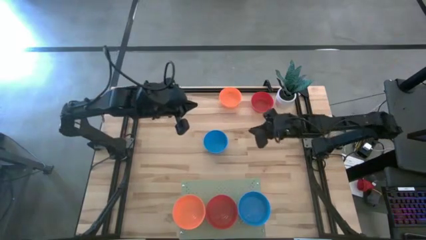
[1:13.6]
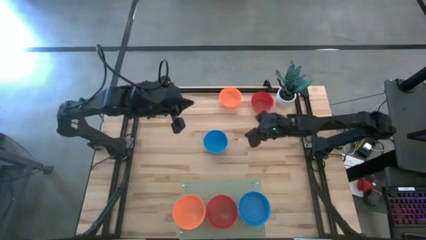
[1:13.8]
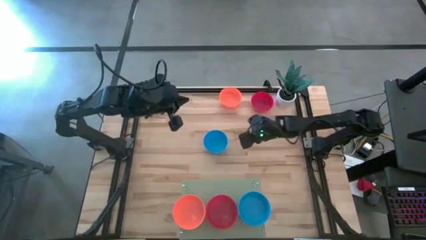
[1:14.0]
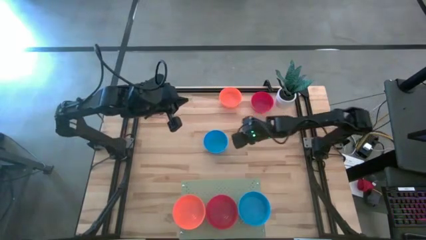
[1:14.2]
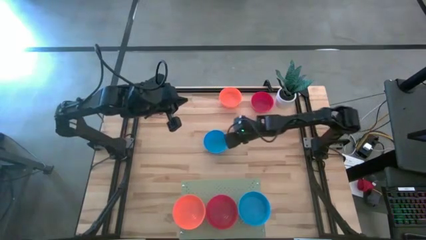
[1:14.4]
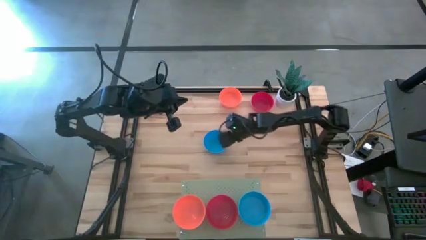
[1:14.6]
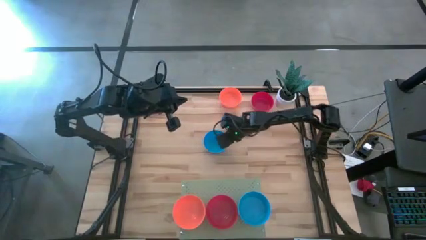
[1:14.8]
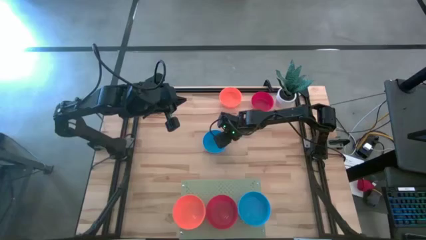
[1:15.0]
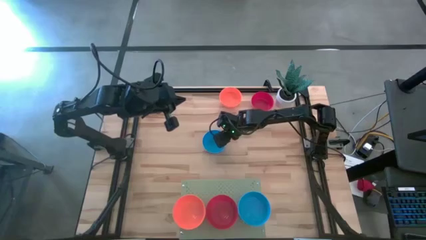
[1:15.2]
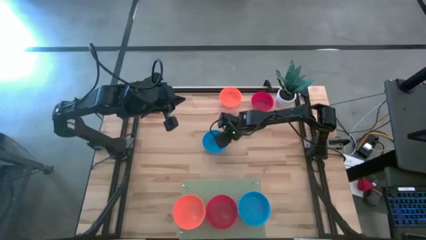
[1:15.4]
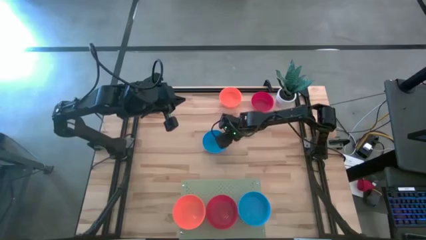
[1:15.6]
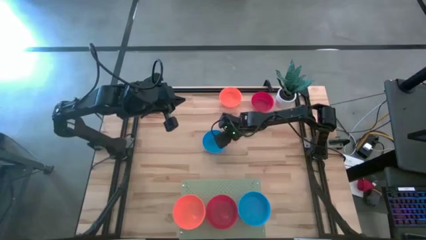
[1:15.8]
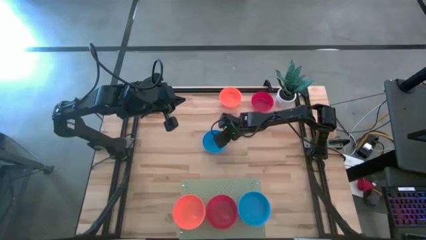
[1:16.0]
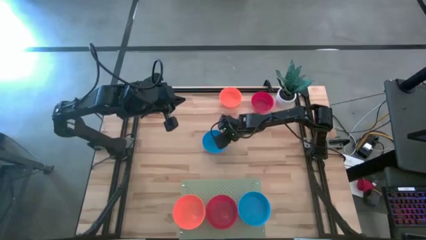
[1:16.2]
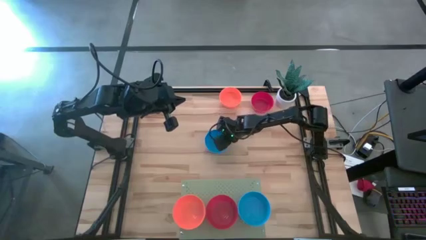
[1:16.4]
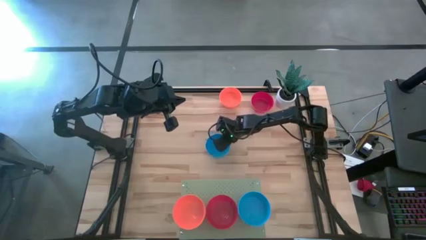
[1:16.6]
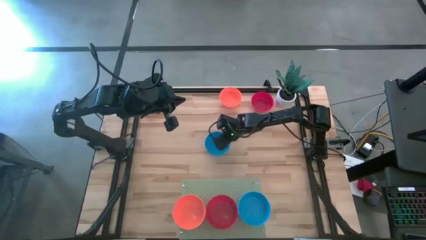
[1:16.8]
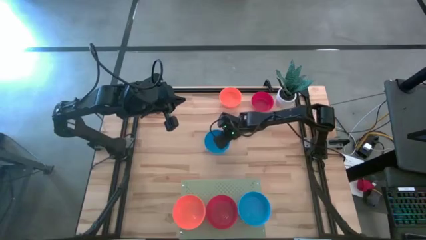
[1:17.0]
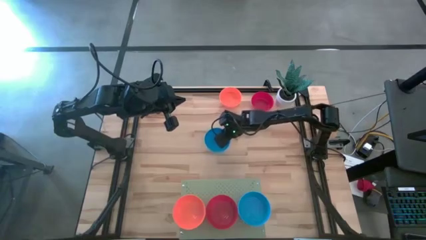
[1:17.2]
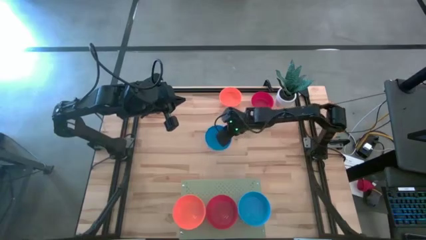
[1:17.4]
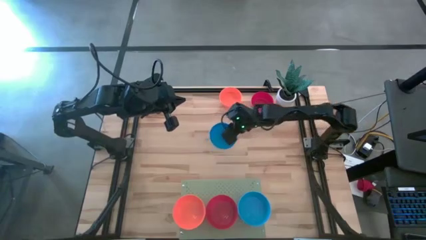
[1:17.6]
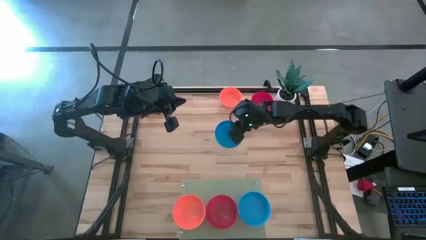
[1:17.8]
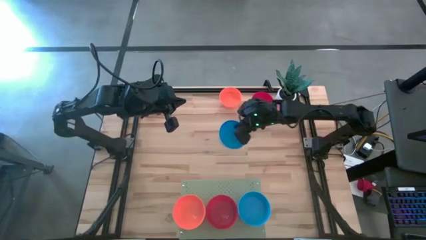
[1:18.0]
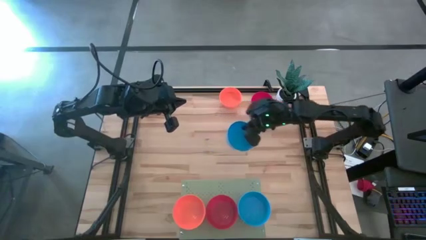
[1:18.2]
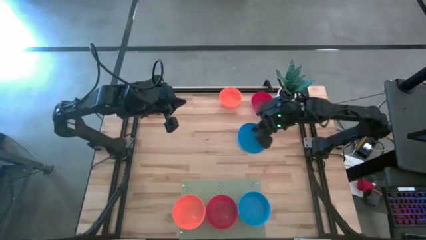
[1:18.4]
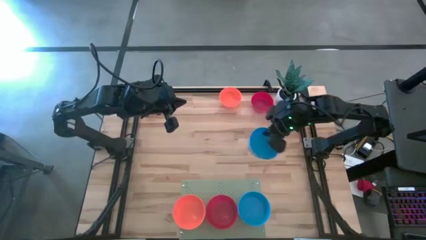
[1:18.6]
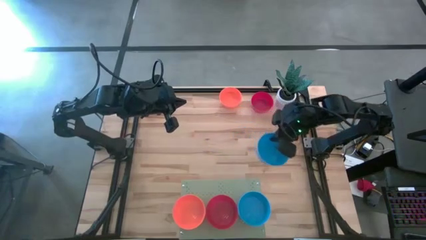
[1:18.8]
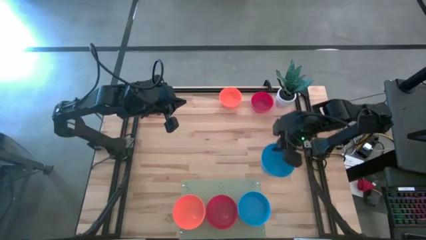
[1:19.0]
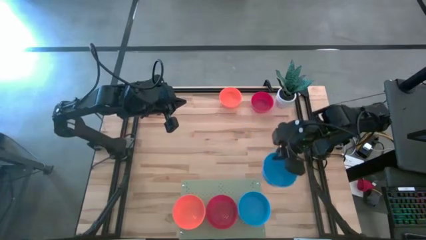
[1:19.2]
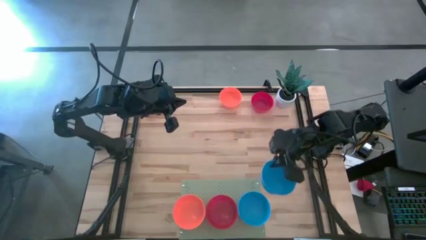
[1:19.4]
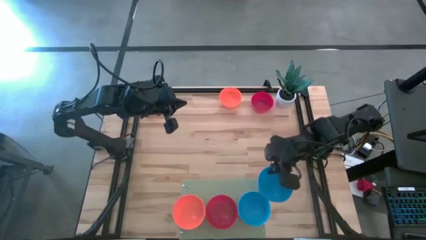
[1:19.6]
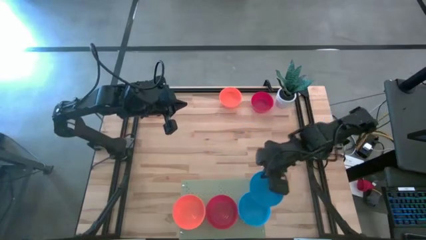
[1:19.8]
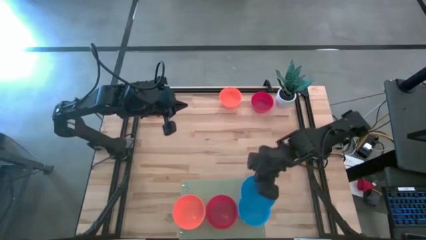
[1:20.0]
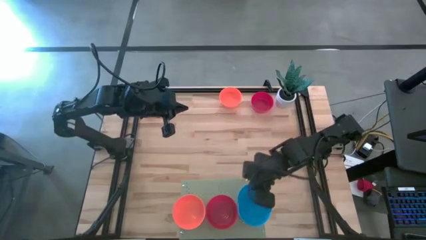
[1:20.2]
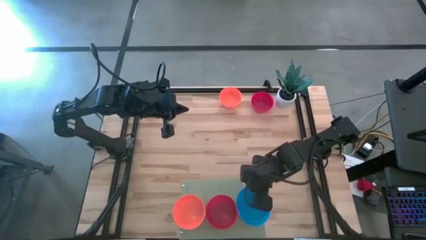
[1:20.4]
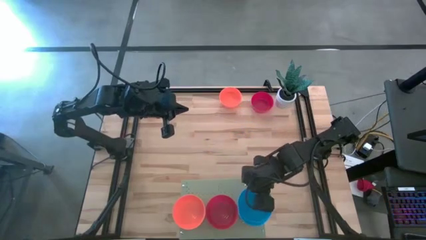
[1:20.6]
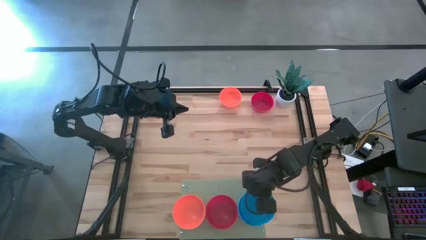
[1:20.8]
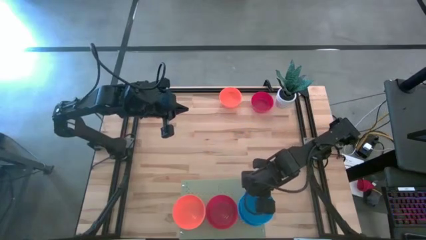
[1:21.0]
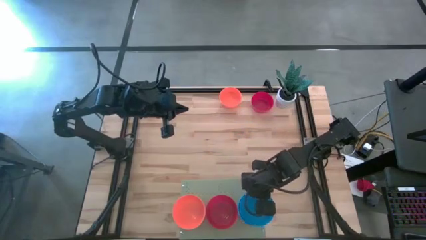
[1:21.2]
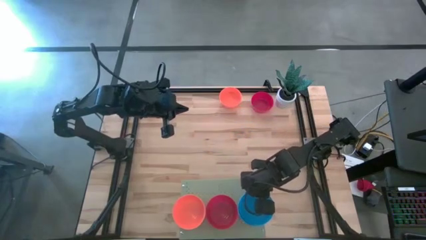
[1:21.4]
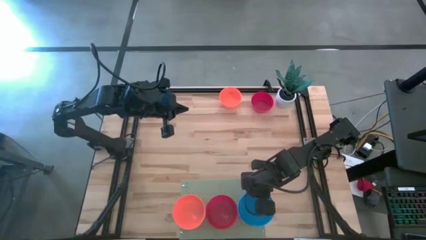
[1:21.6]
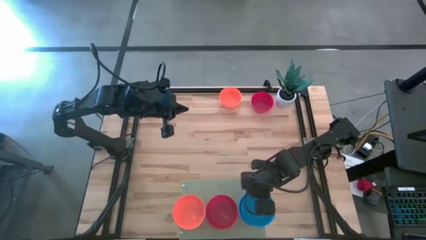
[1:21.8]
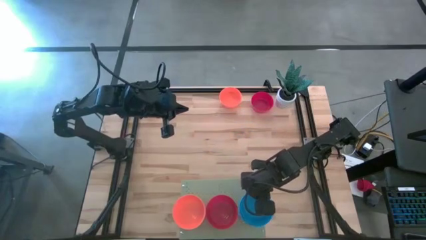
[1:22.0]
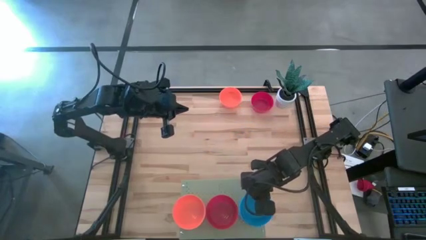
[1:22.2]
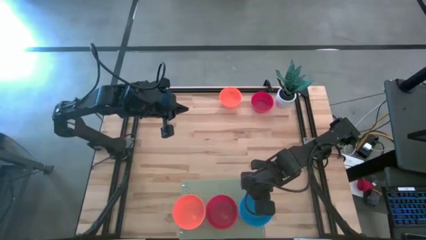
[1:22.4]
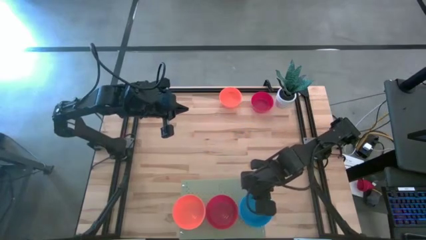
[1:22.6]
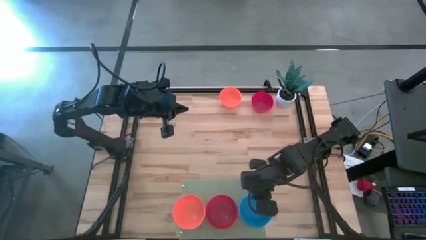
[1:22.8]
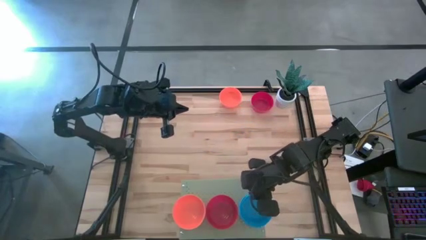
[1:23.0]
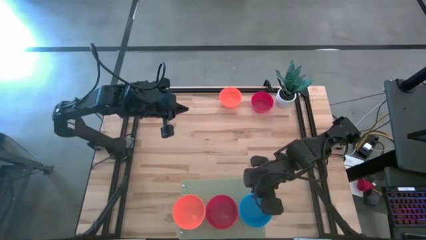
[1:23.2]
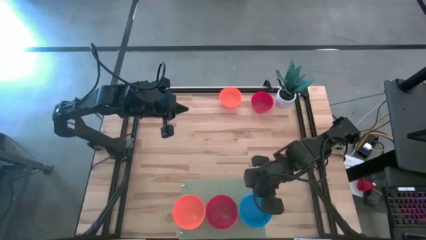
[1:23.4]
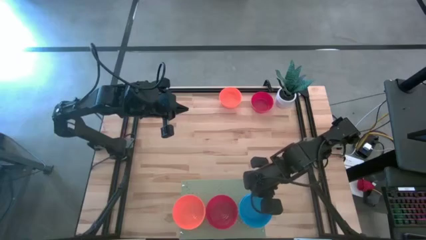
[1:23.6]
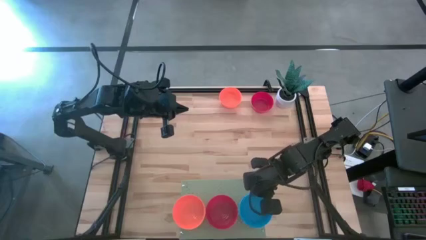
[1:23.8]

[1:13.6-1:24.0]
Task: Pick & Place Mini bowls
Stack the blue bowl on the blue bowl on the shelf

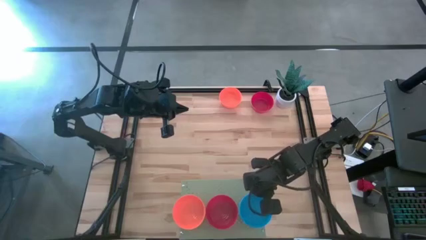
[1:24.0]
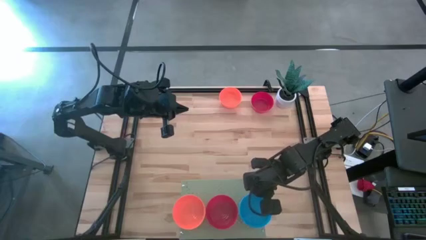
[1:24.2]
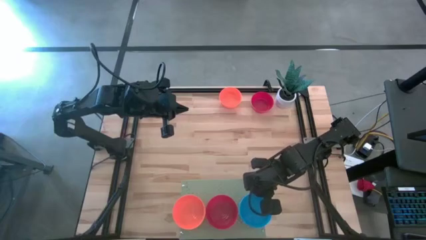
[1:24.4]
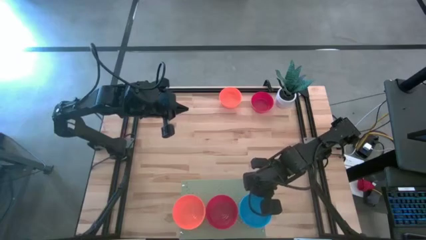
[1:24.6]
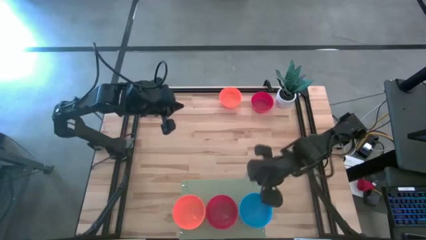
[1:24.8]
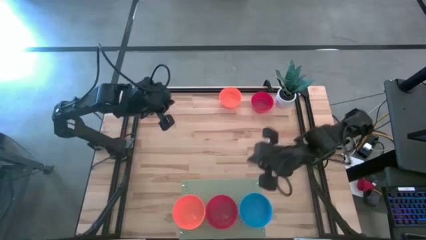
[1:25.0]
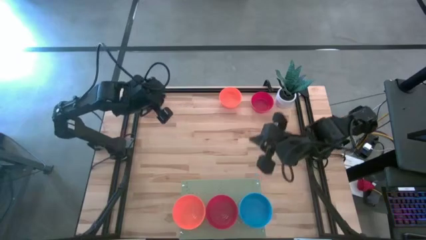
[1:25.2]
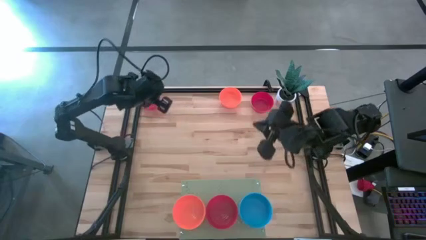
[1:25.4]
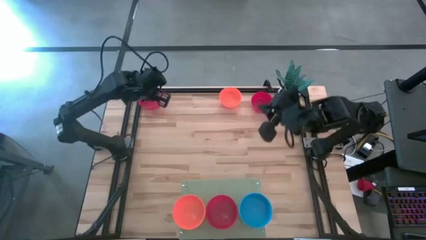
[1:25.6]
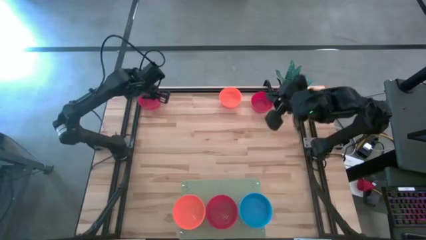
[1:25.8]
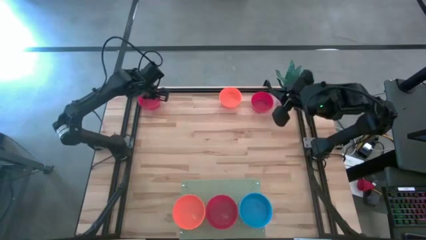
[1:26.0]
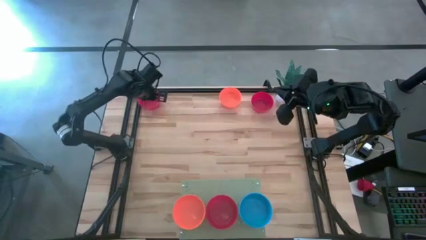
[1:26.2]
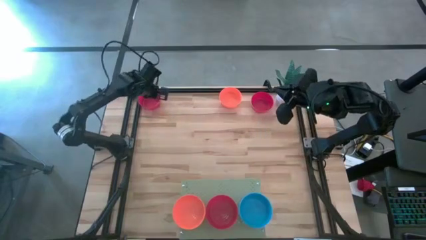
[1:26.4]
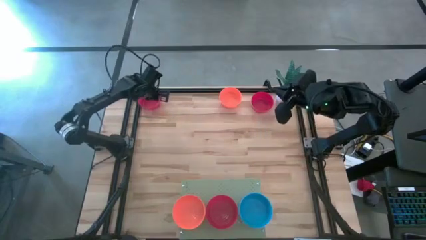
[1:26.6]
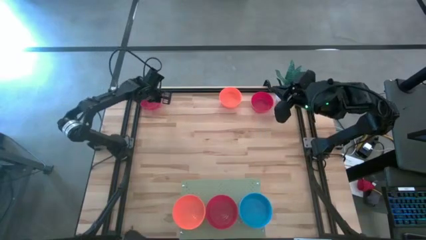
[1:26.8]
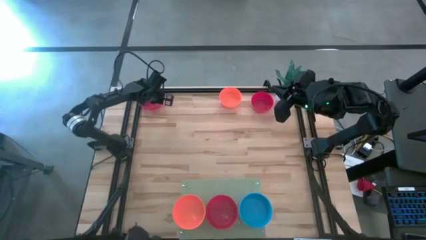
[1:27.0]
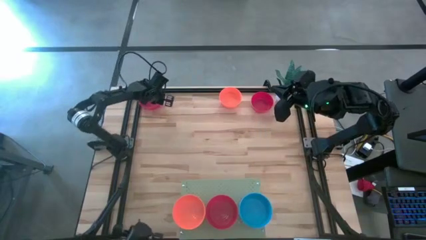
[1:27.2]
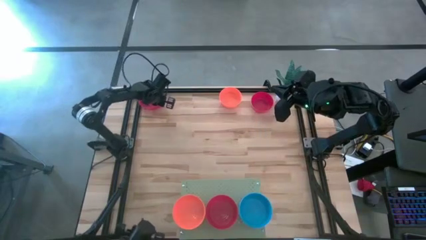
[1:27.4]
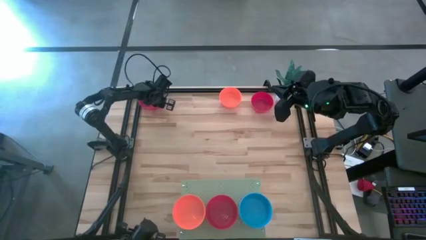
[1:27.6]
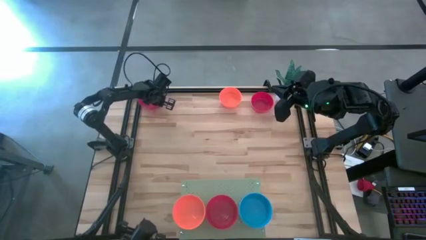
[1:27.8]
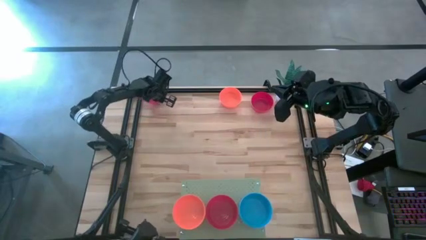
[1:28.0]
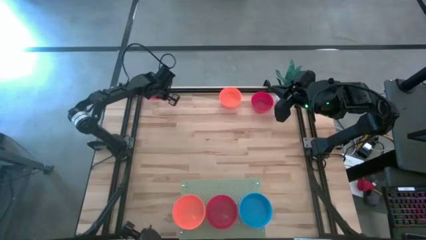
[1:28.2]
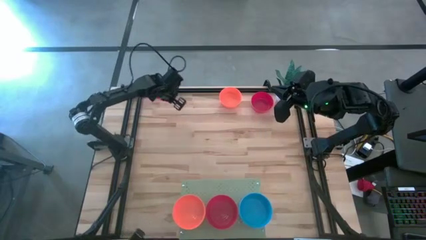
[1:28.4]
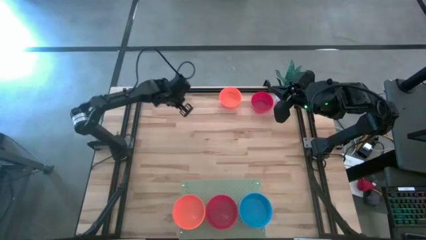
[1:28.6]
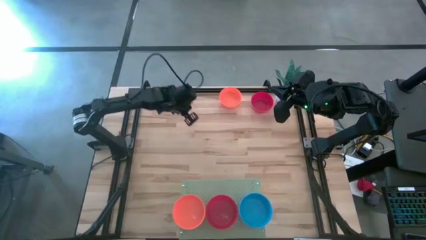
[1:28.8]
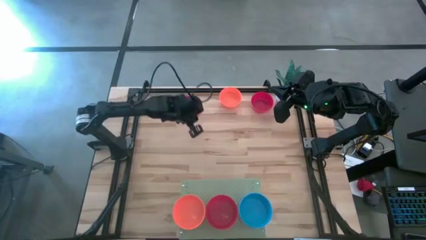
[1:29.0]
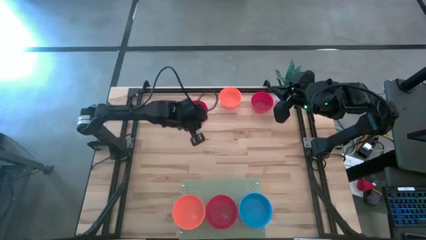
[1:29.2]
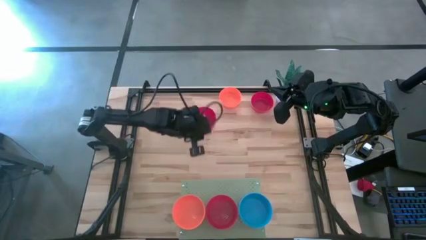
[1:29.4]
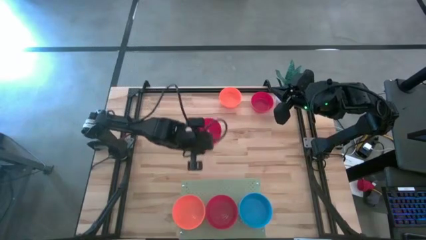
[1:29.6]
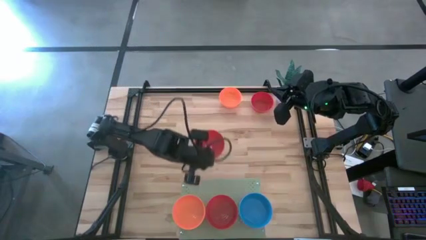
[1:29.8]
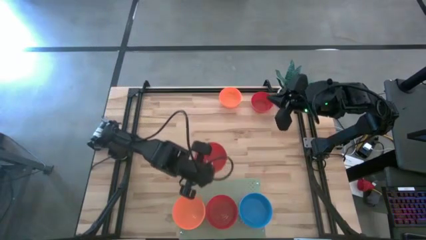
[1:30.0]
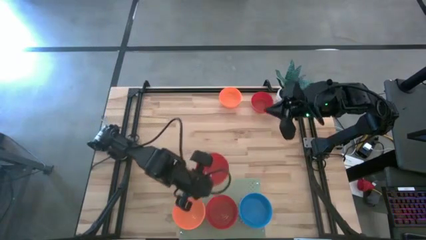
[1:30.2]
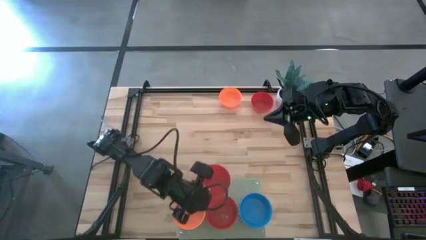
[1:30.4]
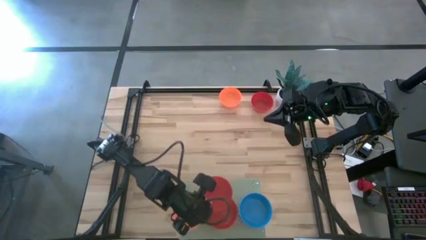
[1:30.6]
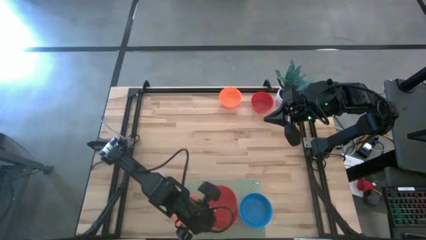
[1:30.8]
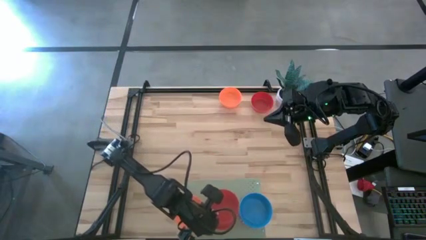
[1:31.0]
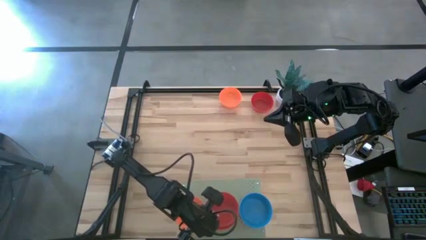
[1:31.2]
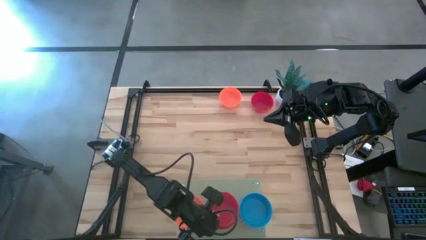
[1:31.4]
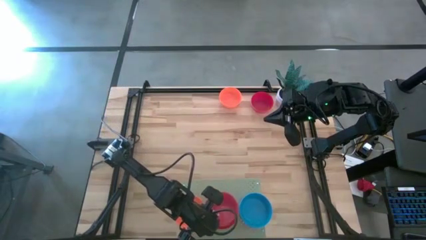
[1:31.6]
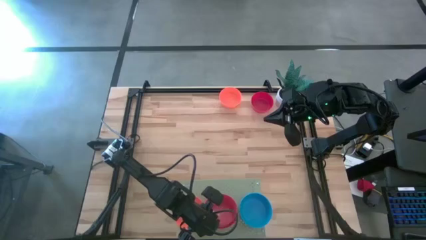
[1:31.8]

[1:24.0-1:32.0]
Stack the left red bowl on the red bowl on the shelf
